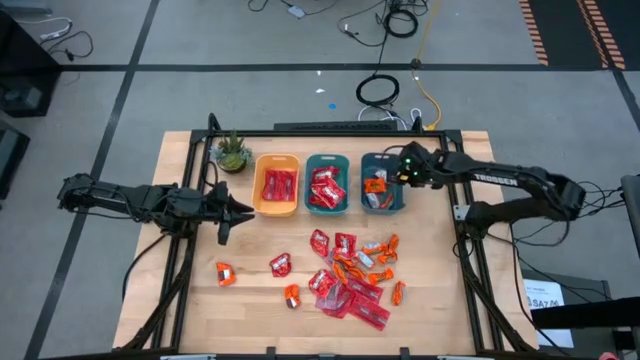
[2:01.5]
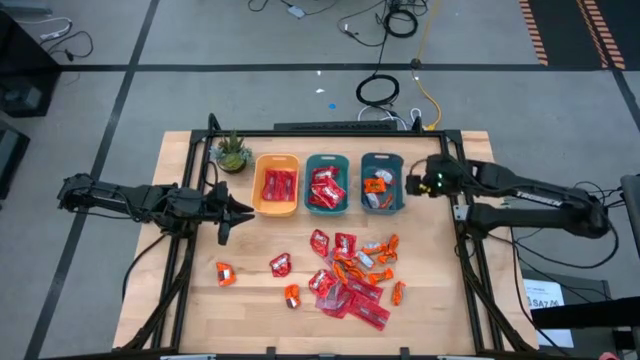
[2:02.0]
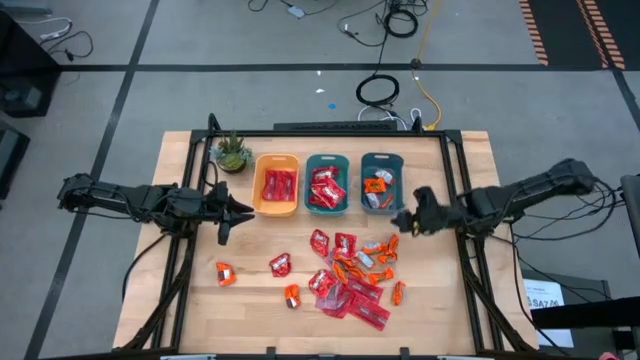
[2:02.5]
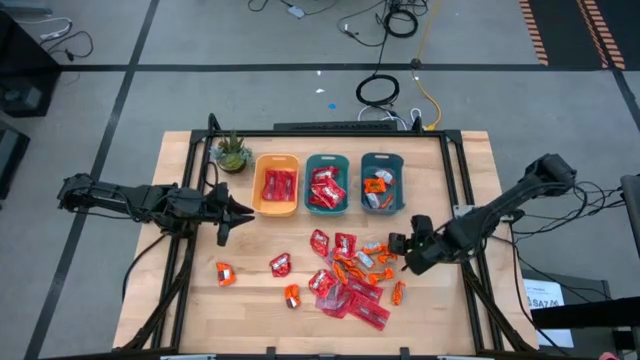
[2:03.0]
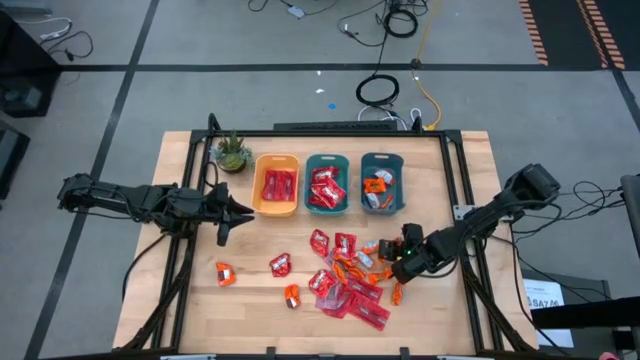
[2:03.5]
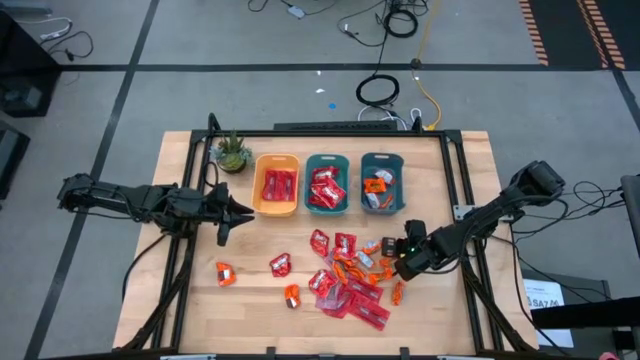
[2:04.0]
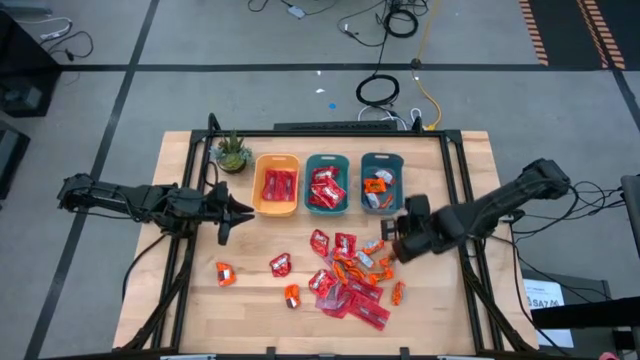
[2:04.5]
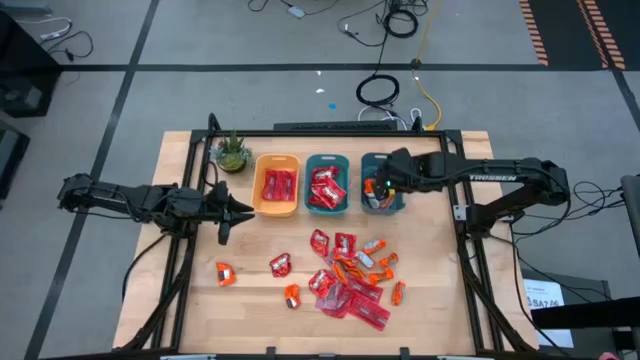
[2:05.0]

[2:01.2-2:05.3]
Task: Sort candy
Put the orange candy into the top right blue bin

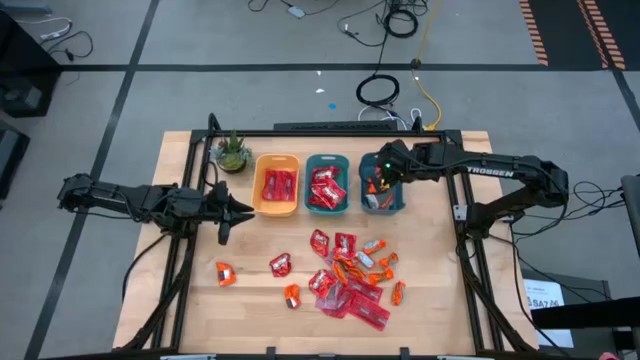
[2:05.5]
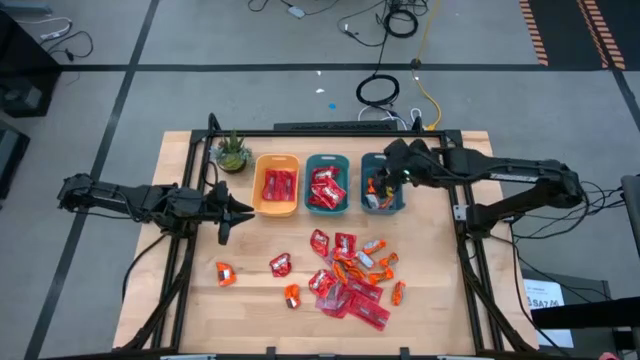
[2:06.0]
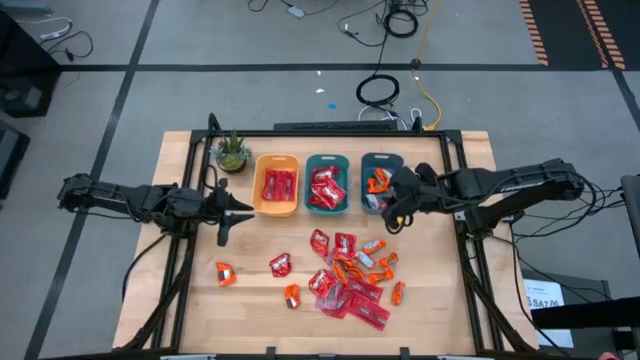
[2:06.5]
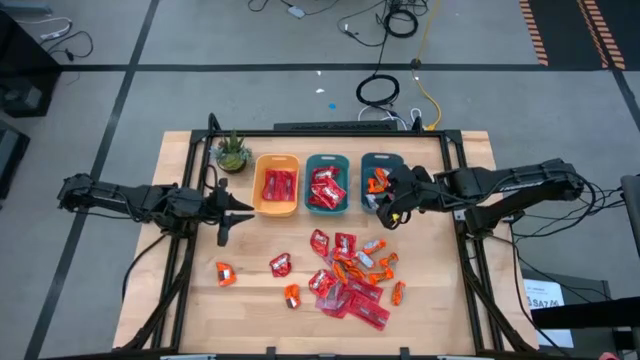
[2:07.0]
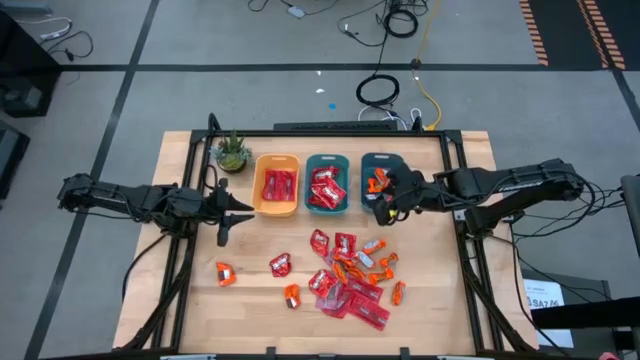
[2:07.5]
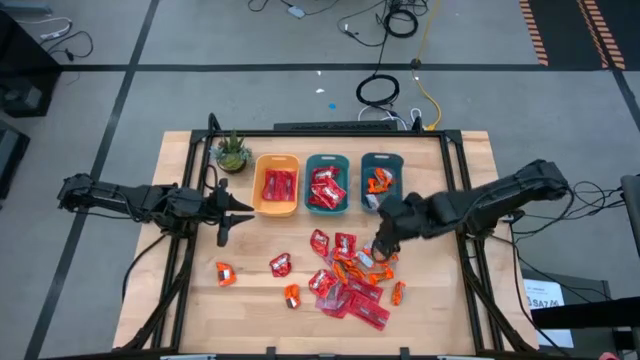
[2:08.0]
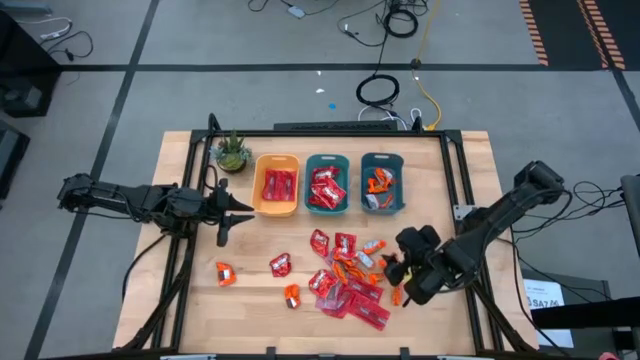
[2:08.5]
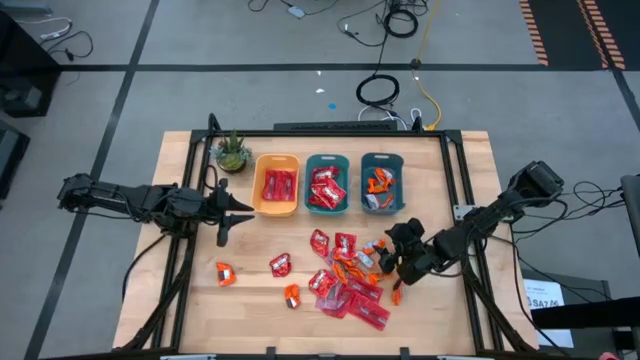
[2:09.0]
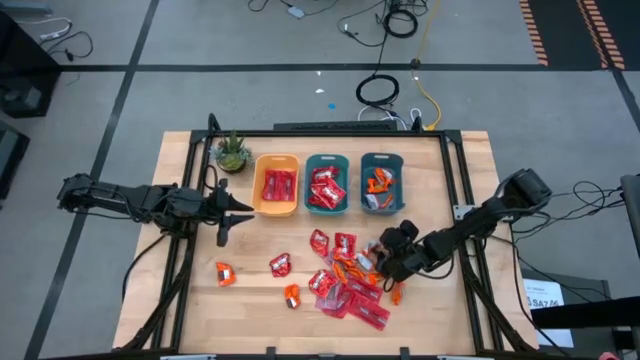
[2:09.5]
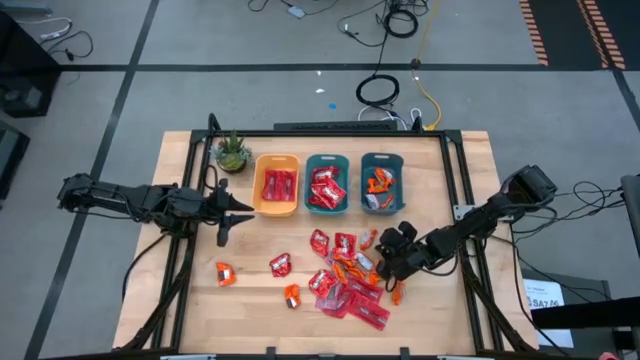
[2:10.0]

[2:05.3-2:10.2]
Put the orange candy into the top right blue bin

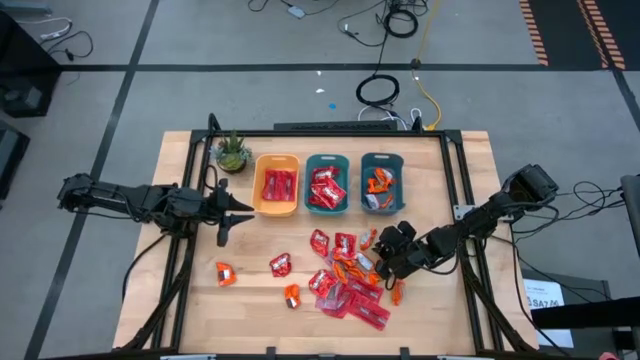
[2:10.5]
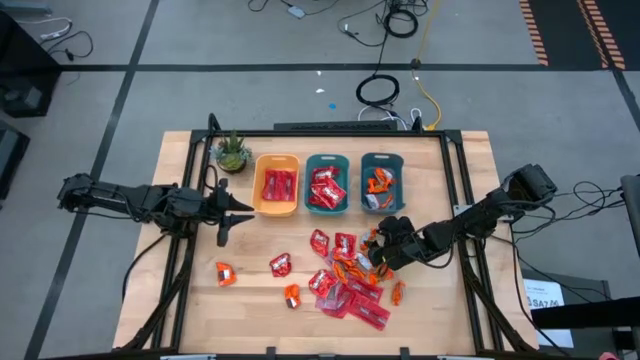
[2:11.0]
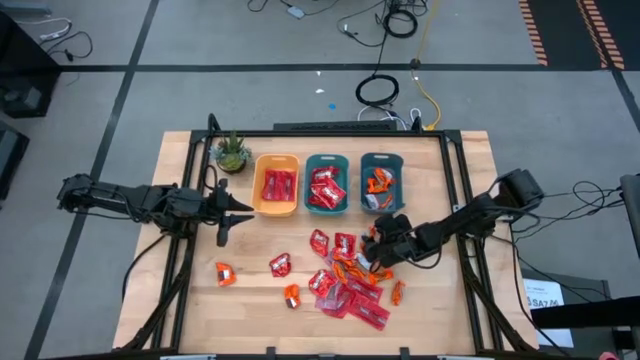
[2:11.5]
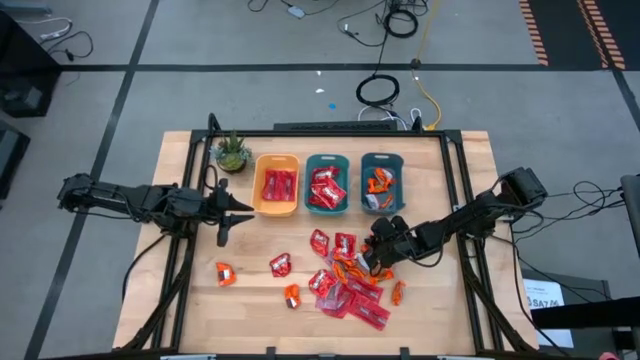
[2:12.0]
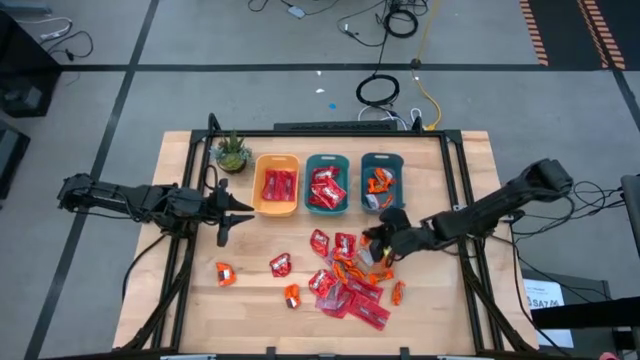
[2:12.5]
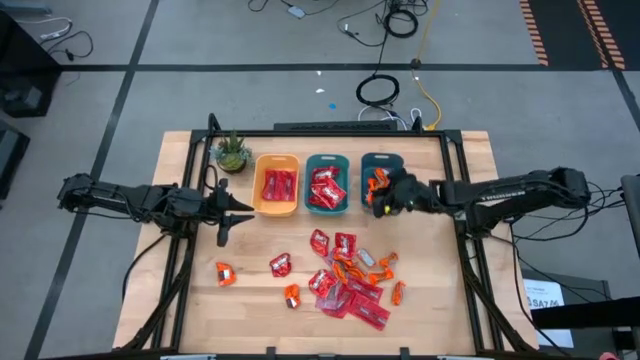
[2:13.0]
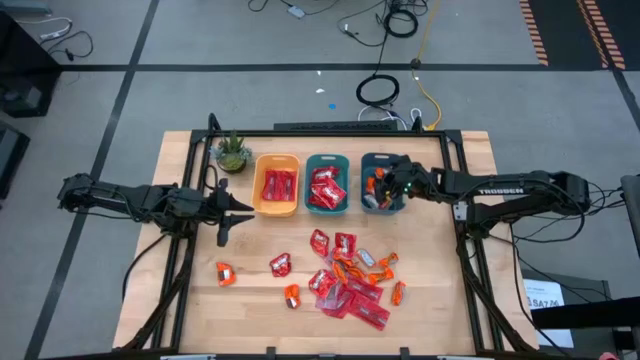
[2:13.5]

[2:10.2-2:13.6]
Put the orange candy into the top right blue bin

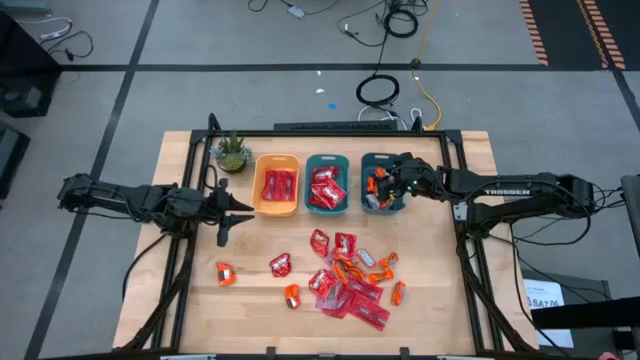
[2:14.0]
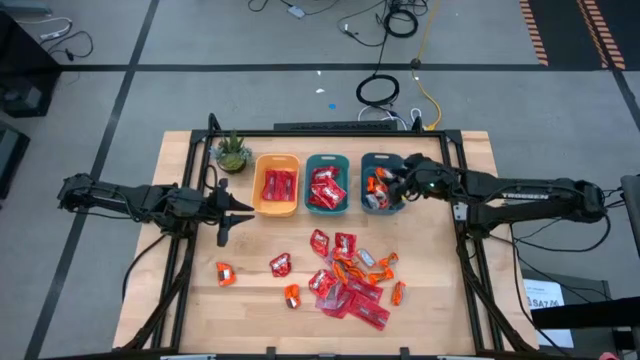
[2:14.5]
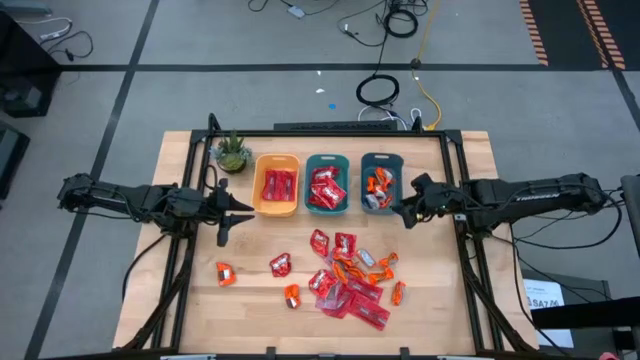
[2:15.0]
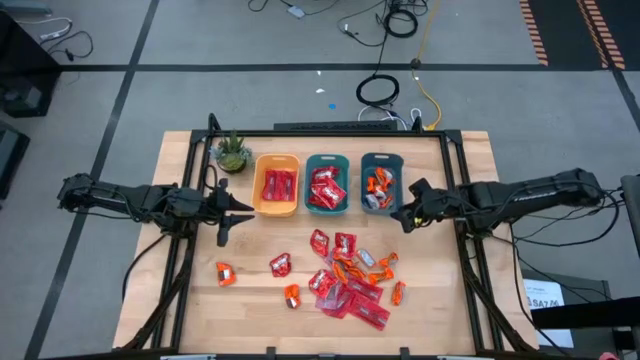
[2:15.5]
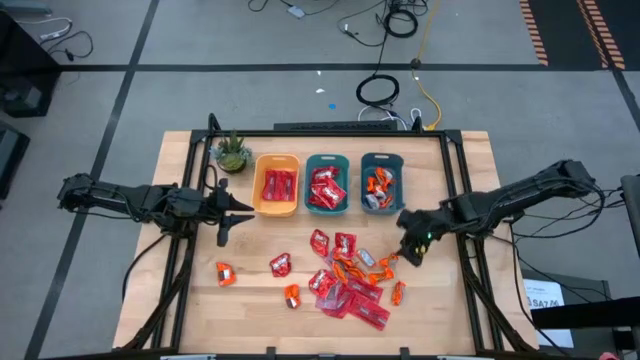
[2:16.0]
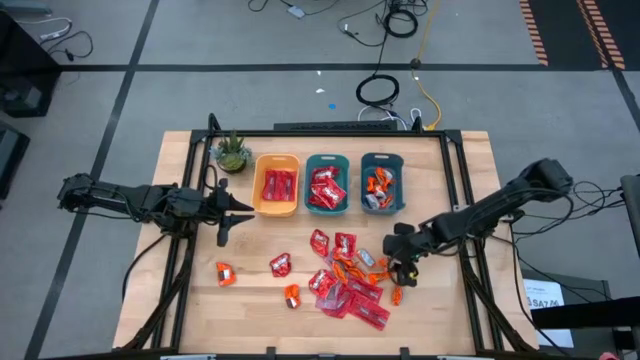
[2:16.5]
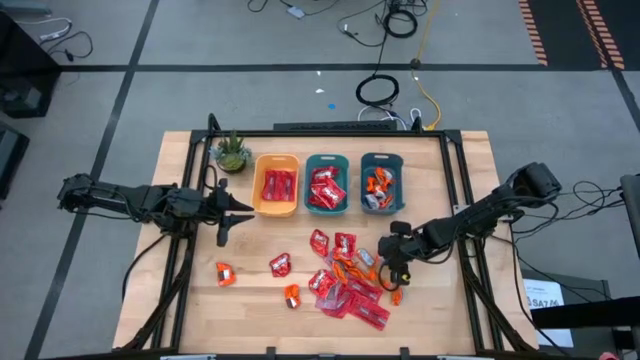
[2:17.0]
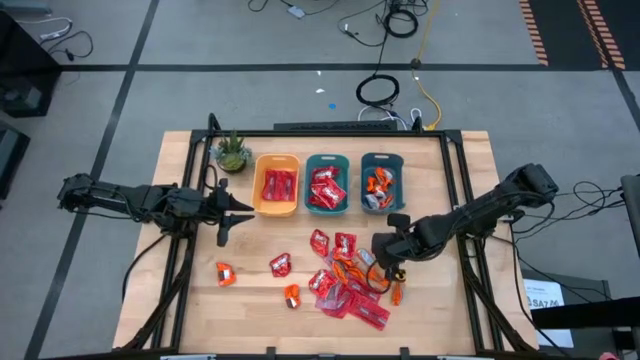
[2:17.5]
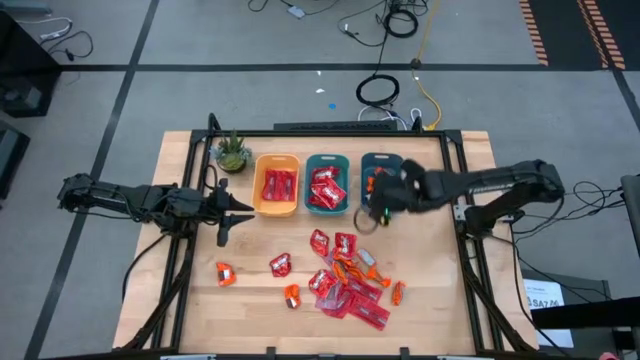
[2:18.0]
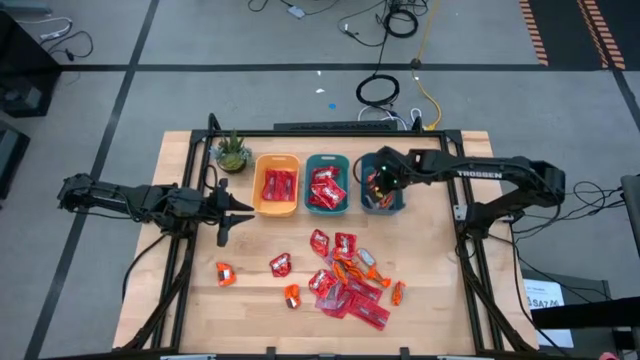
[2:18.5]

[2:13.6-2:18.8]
Put the orange candy into the top right blue bin

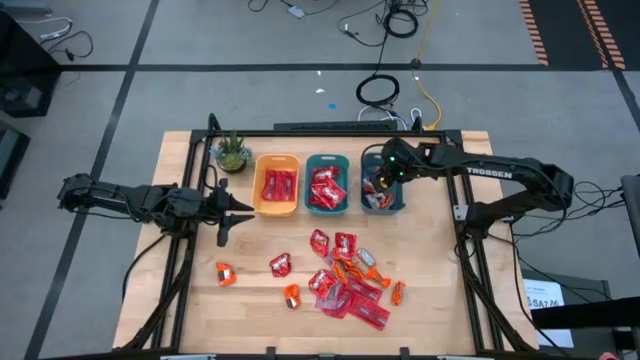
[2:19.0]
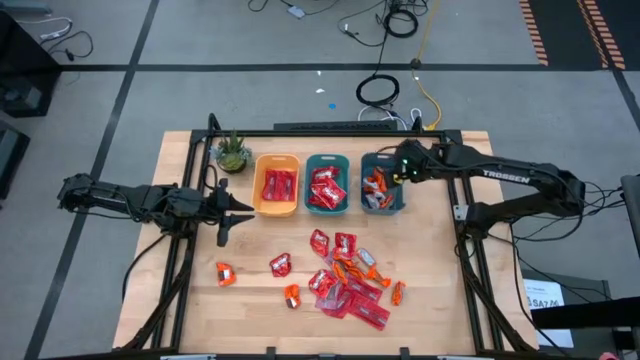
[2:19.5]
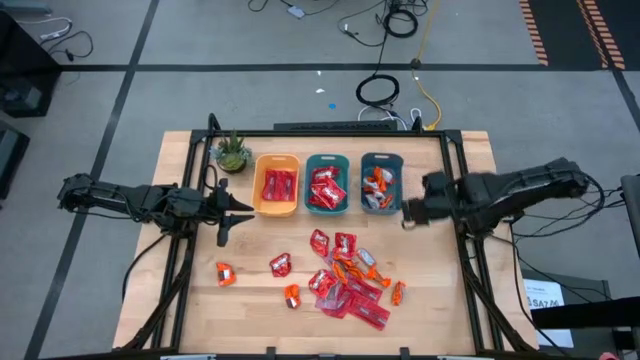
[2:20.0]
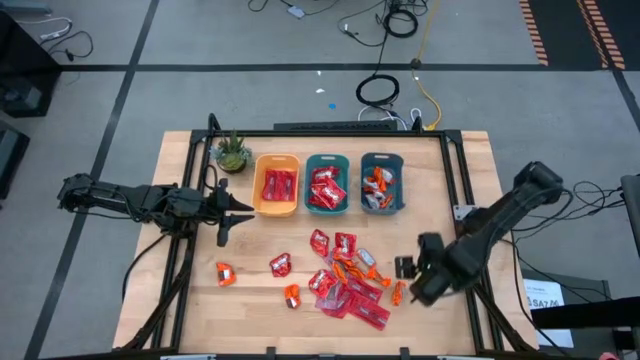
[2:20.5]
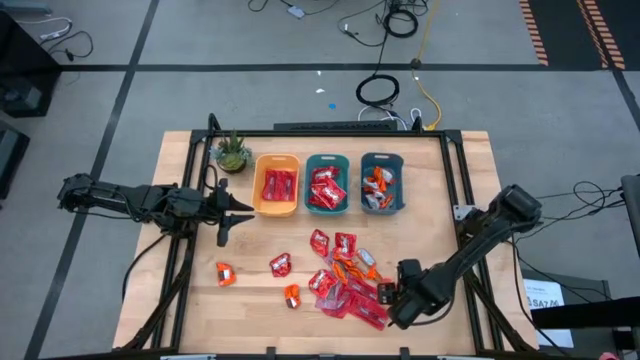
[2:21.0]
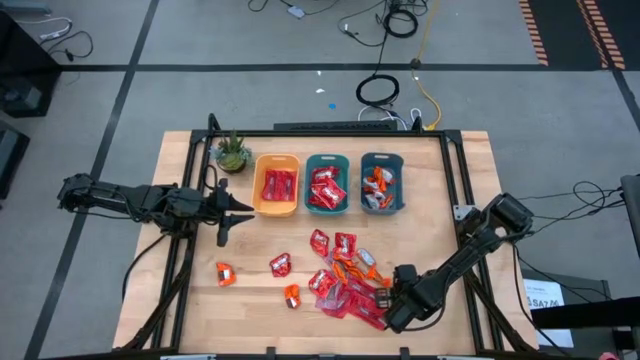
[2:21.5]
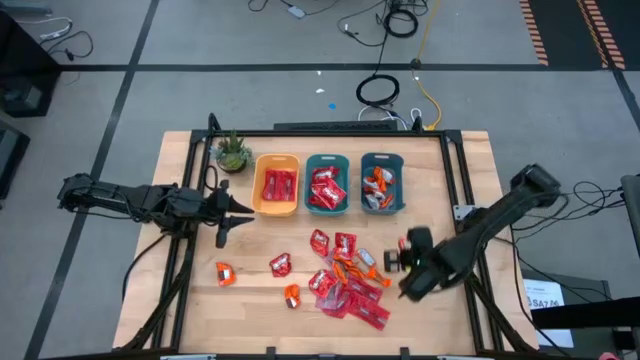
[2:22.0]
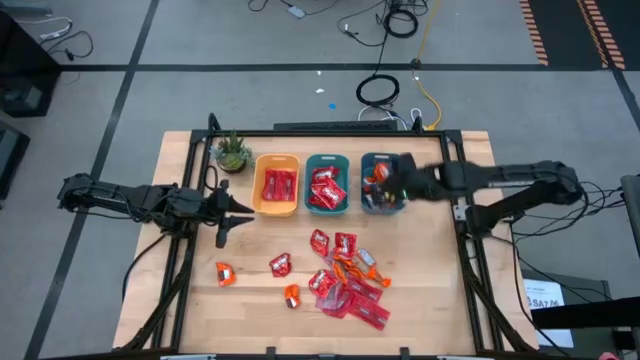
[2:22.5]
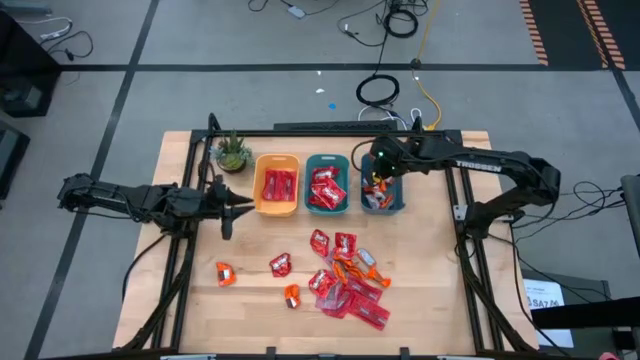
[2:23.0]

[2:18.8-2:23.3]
Put the orange candy into the top right blue bin
